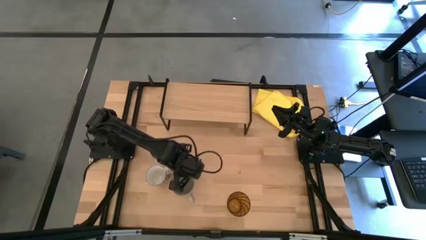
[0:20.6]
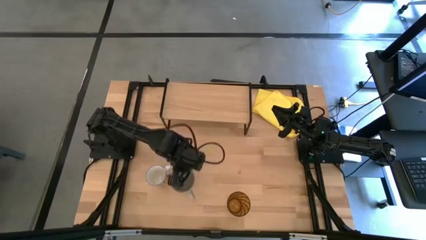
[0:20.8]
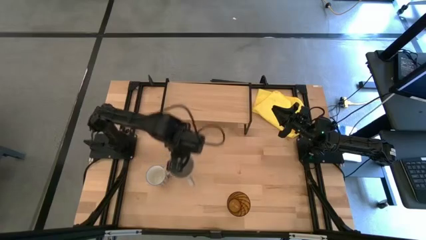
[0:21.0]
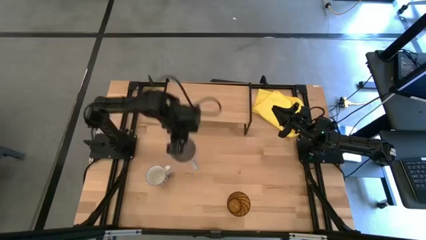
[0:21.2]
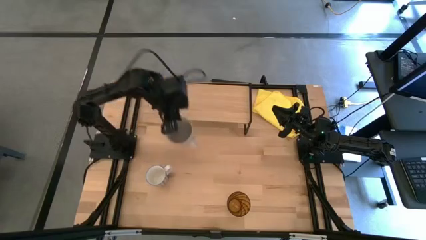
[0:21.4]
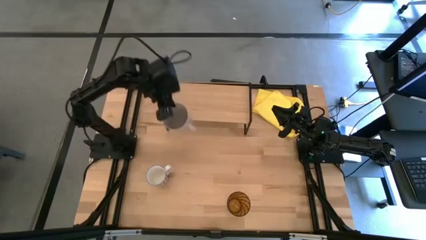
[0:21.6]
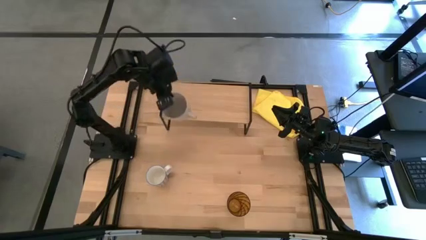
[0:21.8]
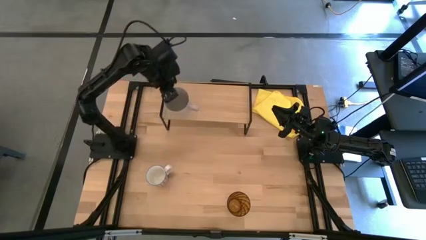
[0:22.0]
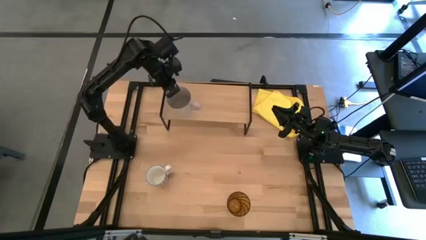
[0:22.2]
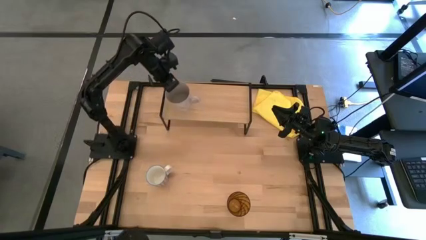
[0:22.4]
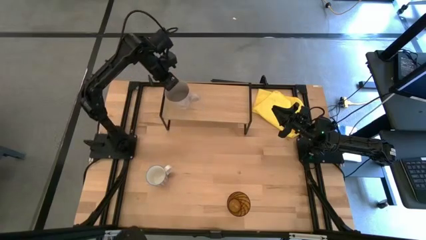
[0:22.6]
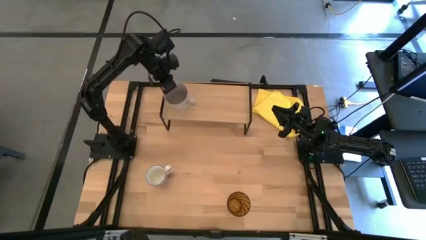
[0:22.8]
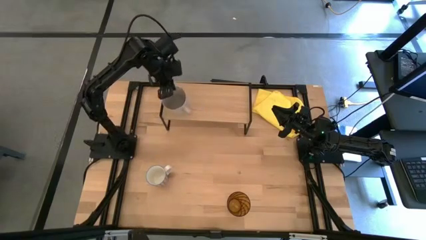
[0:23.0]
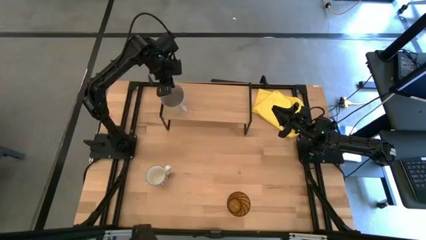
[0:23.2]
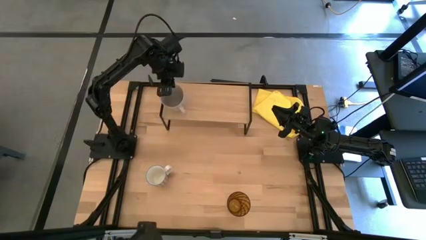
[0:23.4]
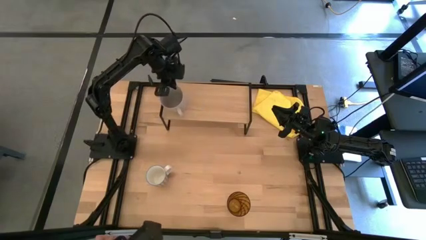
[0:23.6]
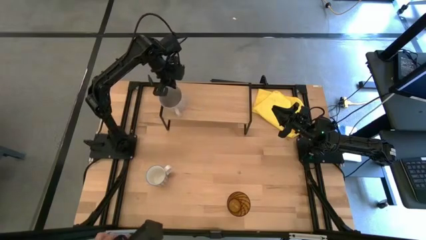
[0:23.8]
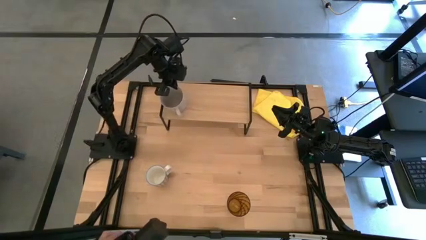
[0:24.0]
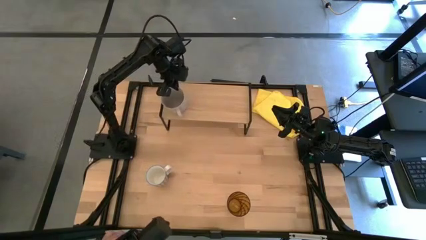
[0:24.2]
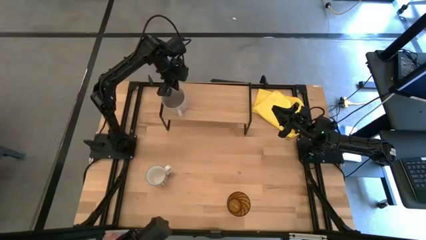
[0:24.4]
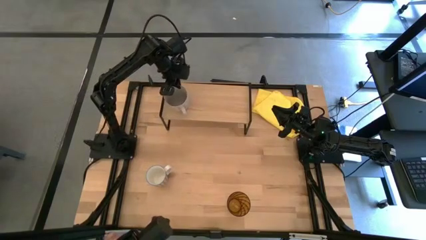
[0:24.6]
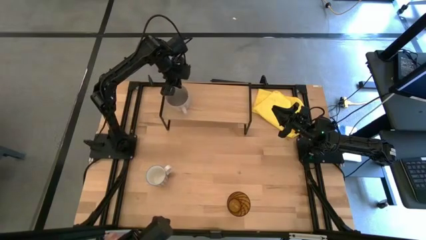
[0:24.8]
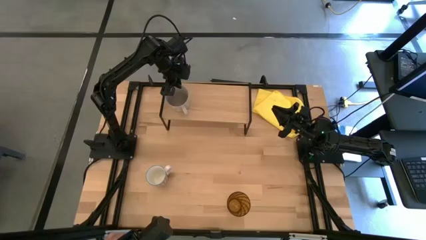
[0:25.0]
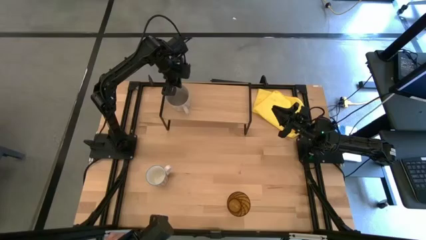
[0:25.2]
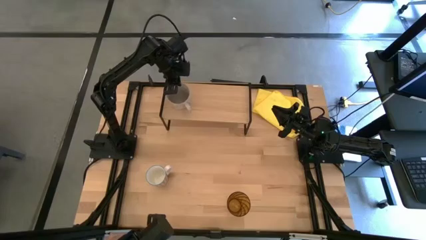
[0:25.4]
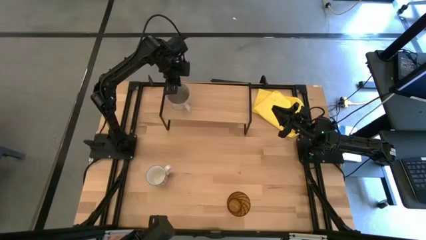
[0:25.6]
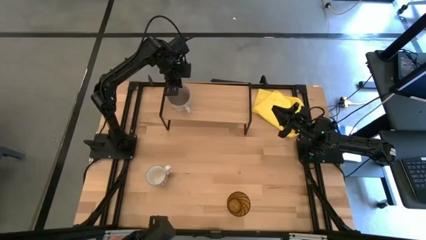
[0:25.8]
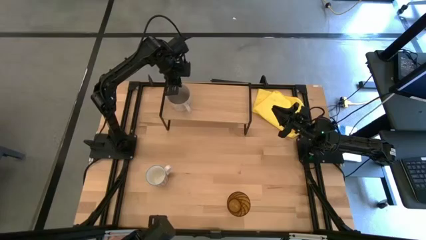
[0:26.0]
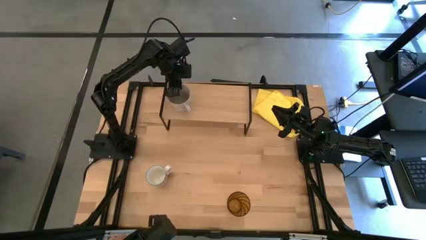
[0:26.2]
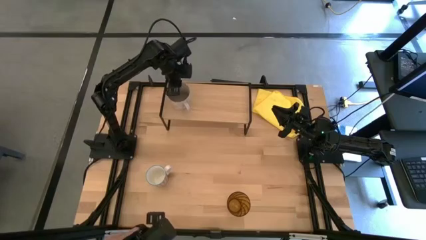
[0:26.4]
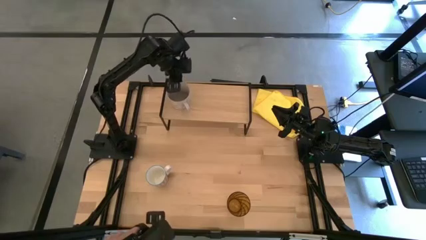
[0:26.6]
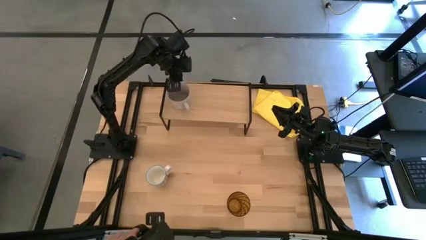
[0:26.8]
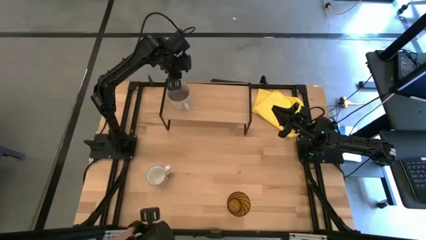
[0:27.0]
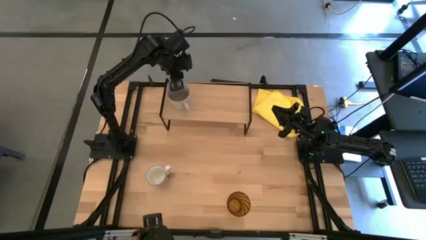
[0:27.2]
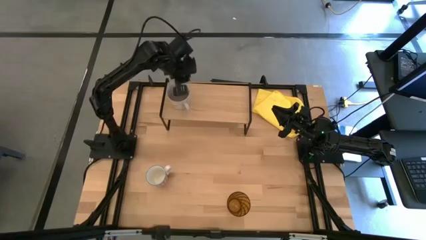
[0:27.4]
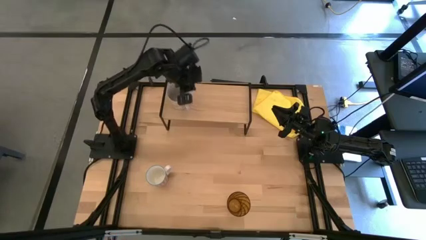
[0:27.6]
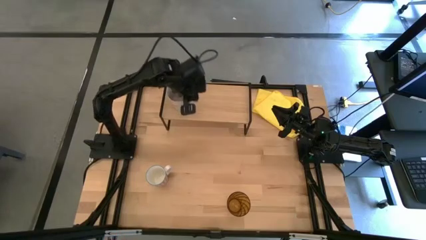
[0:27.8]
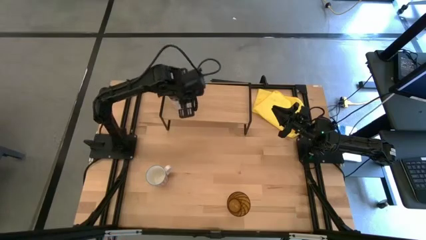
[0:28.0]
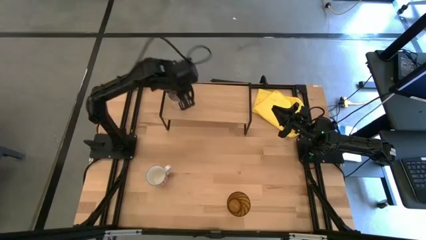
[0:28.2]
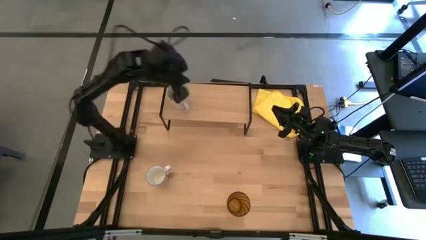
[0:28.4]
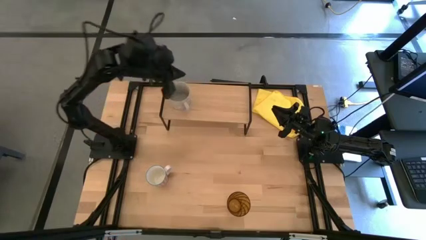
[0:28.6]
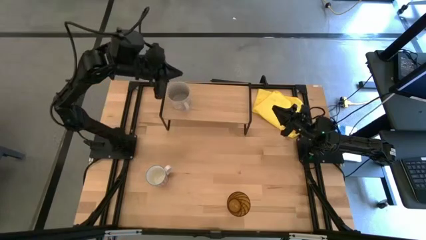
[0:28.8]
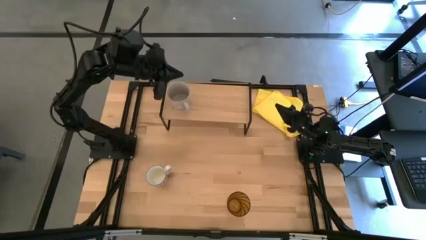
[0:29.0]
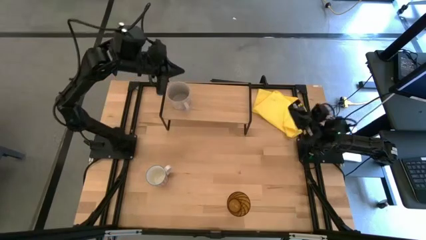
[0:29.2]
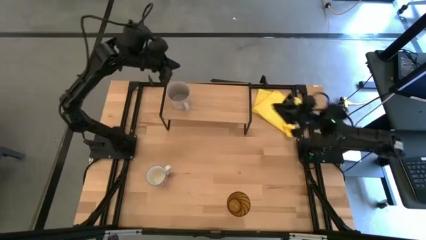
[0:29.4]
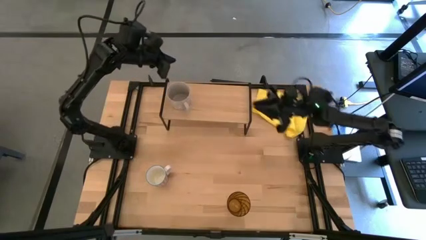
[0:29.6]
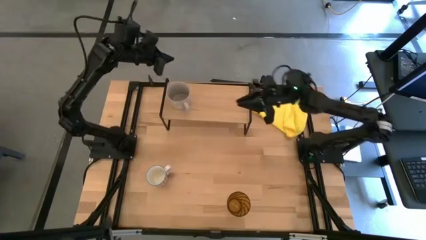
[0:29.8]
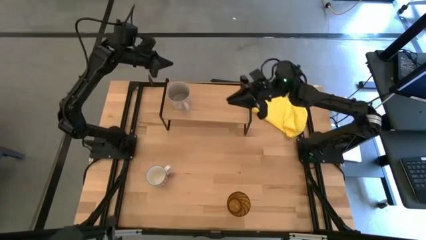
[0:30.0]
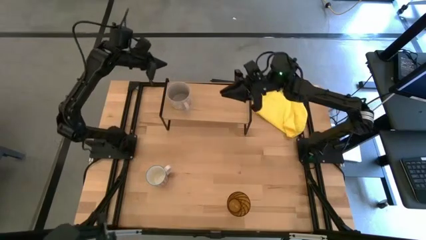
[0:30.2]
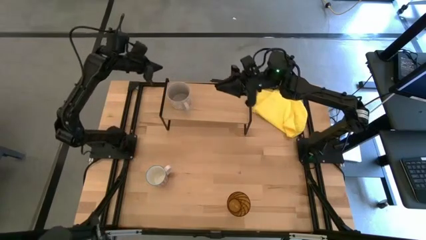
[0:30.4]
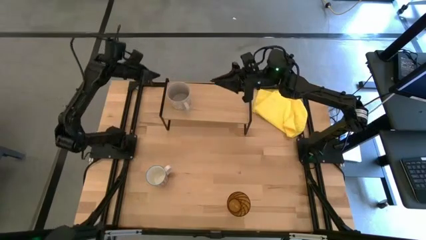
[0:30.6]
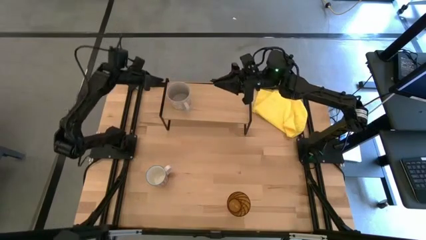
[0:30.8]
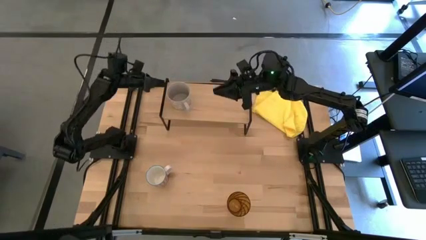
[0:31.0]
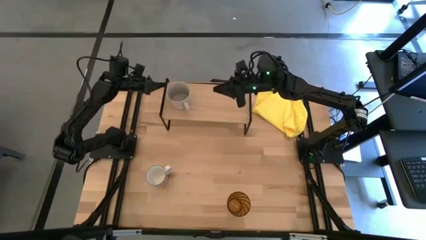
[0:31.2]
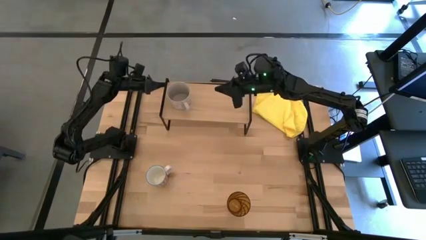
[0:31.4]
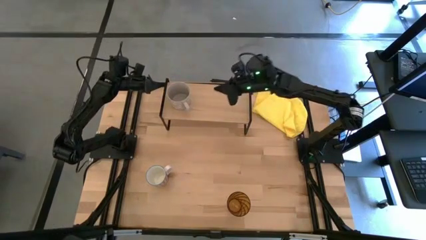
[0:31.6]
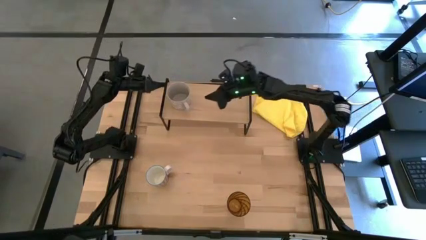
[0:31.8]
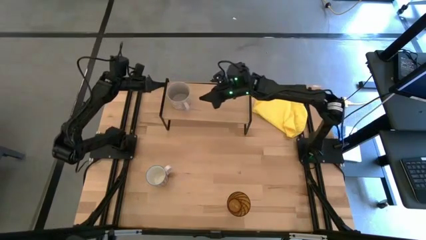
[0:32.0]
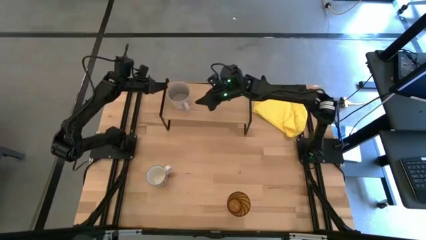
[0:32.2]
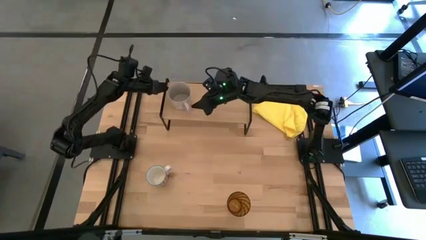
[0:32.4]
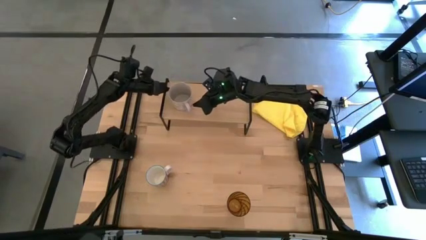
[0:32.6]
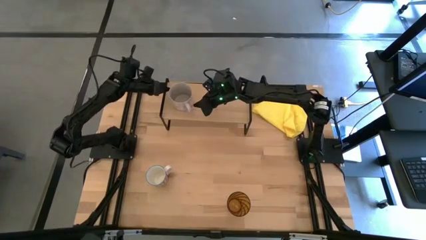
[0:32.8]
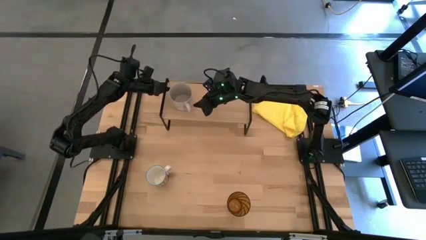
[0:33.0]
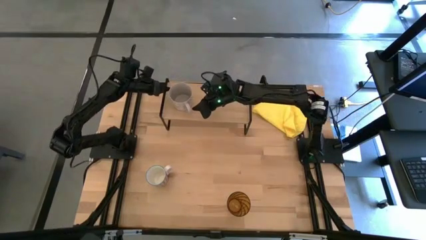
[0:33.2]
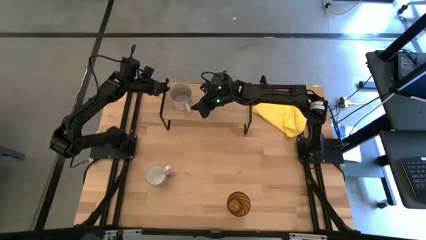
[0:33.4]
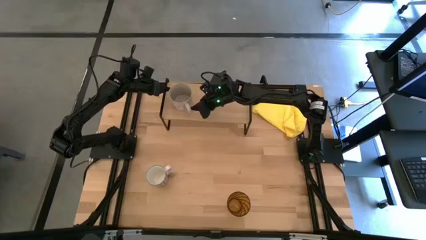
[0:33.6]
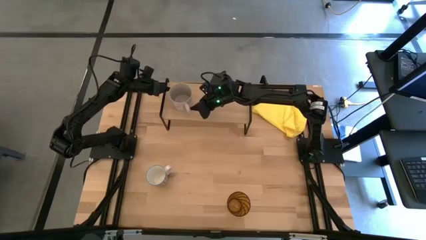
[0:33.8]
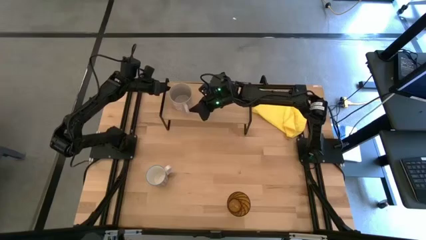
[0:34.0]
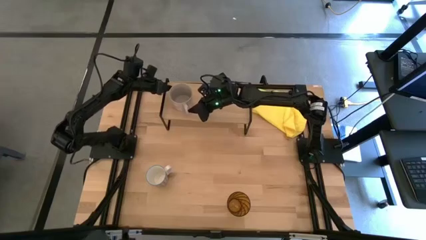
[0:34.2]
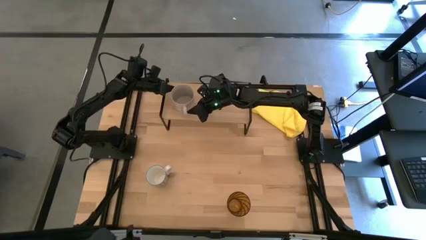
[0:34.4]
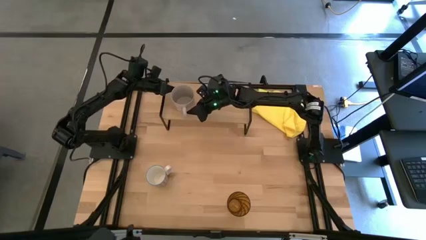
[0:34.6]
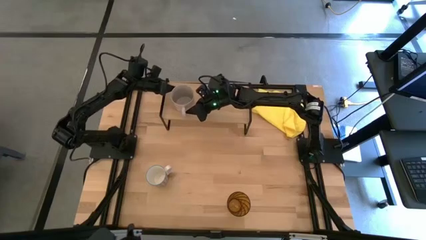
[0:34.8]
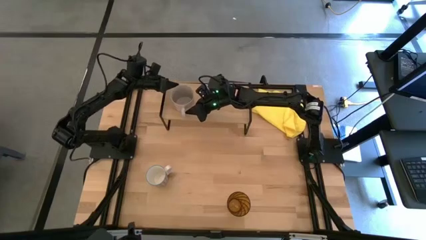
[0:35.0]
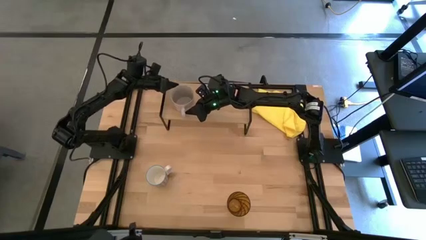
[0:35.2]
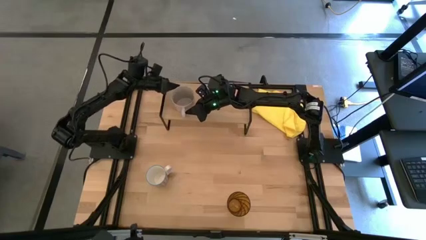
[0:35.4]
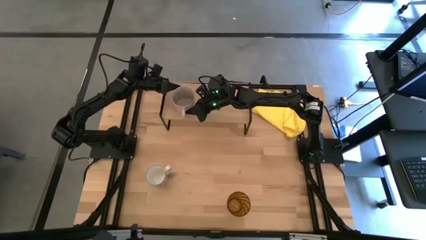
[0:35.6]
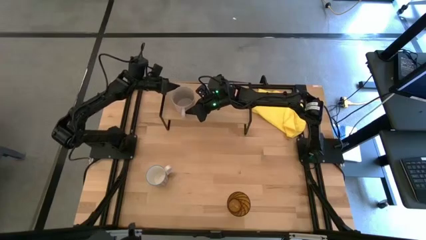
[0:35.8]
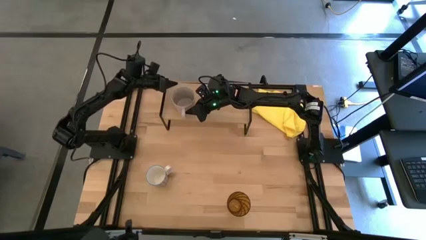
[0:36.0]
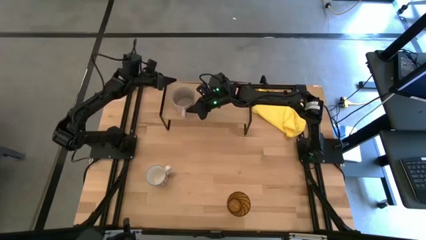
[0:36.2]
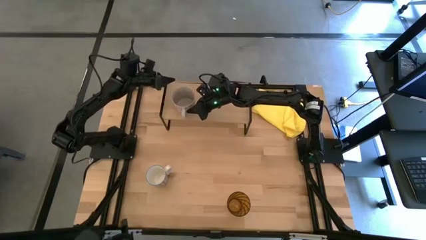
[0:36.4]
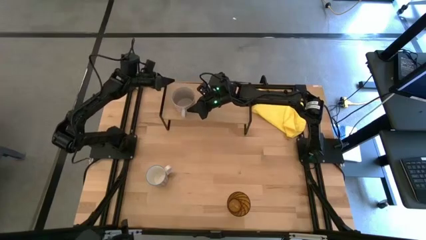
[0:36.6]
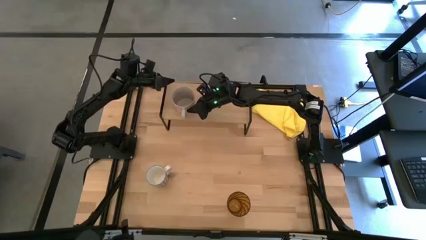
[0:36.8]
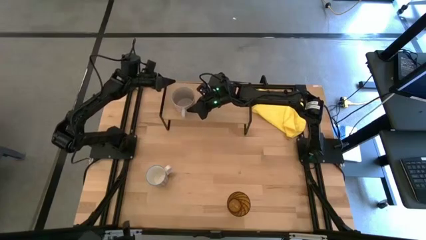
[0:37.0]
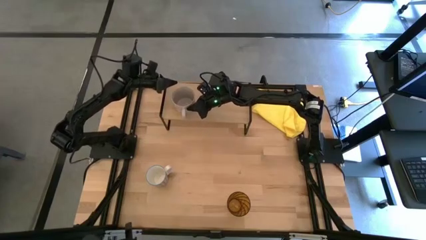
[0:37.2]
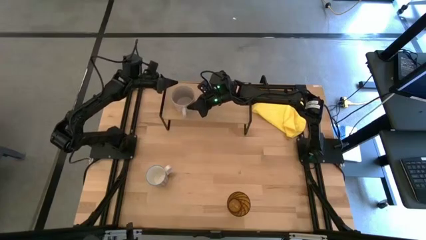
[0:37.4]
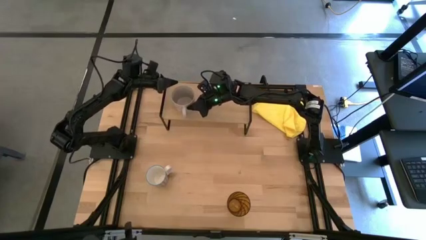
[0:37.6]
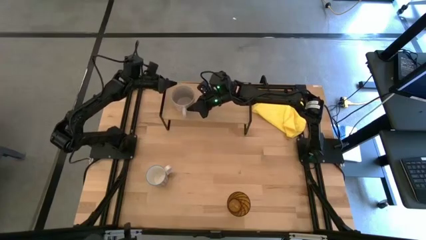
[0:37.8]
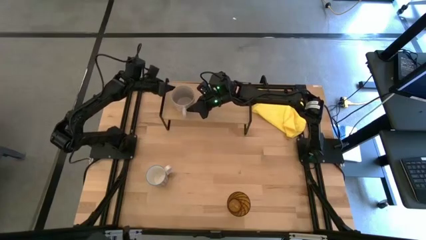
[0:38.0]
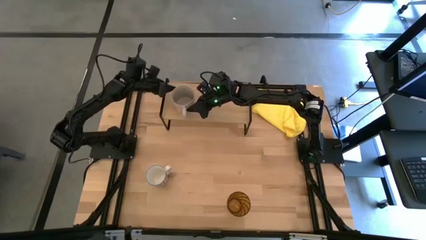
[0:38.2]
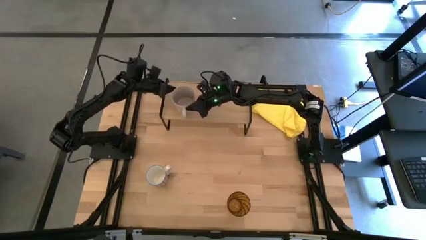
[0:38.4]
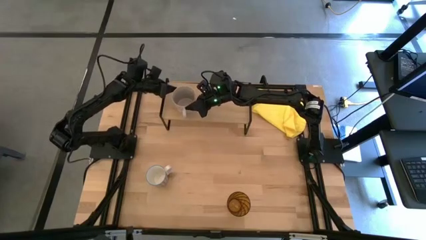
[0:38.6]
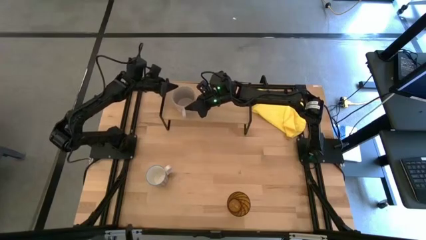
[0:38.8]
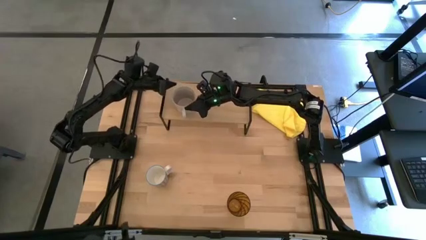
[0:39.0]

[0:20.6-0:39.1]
Task: Stack small to large cups/mugs on shelf
Put the gray mug on the shelf
